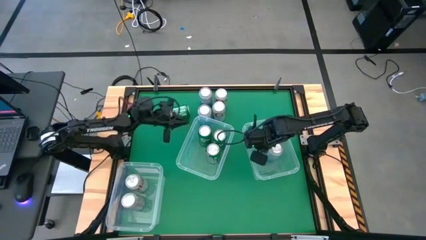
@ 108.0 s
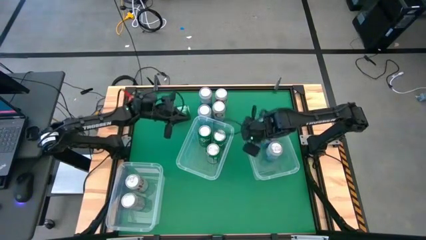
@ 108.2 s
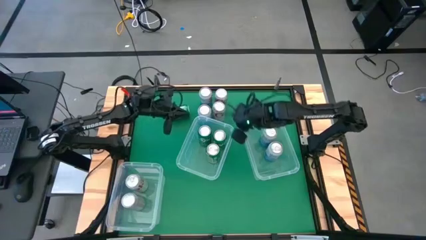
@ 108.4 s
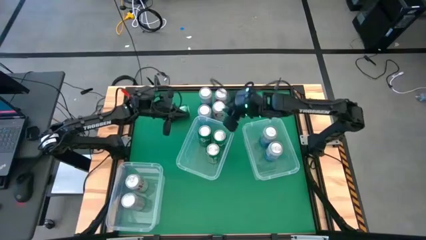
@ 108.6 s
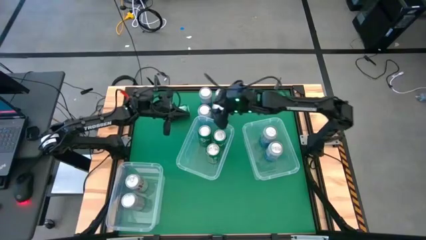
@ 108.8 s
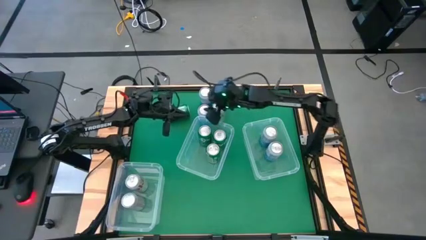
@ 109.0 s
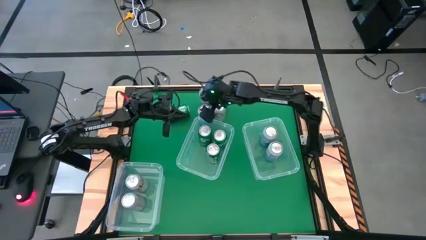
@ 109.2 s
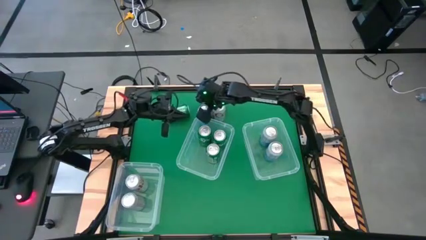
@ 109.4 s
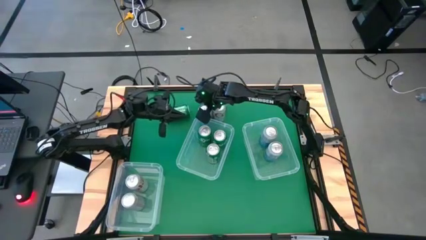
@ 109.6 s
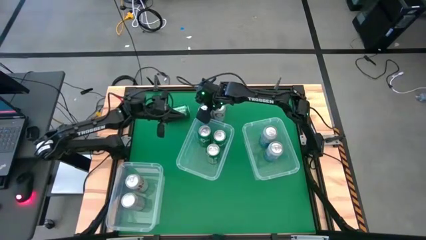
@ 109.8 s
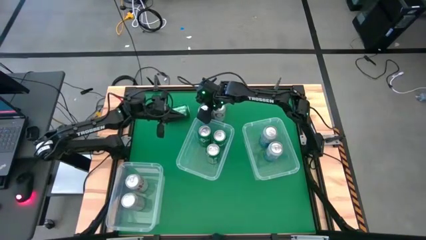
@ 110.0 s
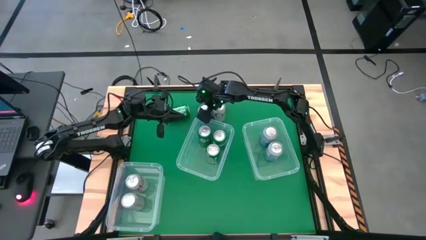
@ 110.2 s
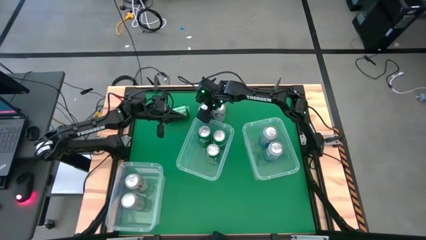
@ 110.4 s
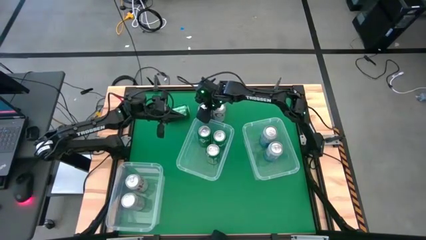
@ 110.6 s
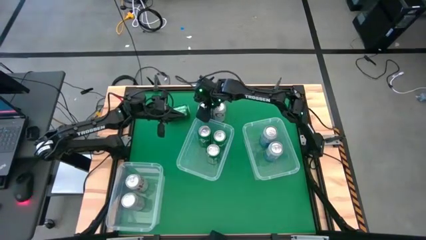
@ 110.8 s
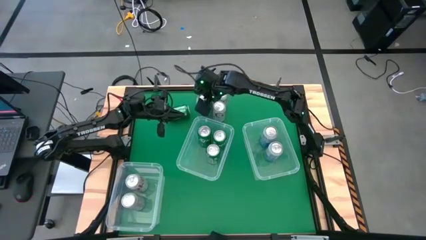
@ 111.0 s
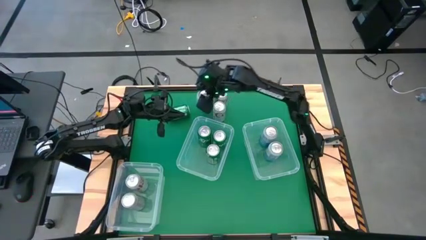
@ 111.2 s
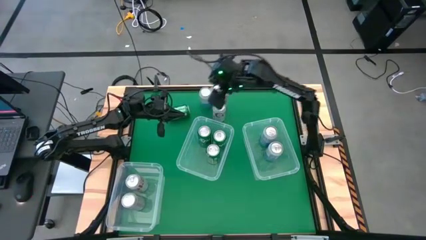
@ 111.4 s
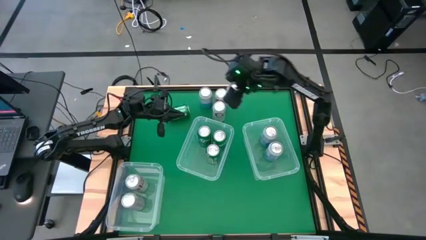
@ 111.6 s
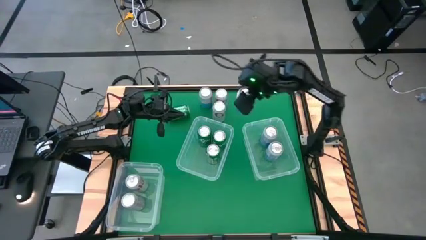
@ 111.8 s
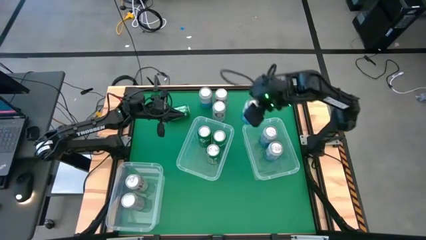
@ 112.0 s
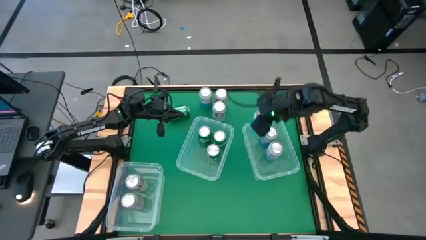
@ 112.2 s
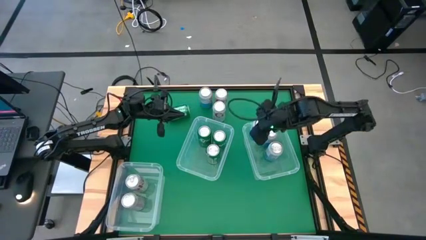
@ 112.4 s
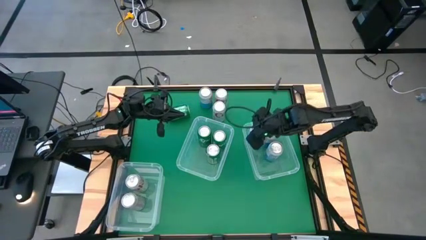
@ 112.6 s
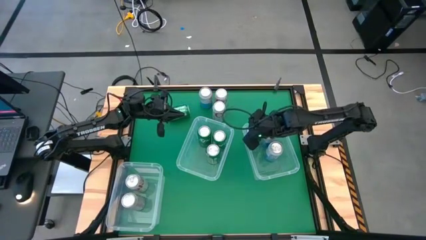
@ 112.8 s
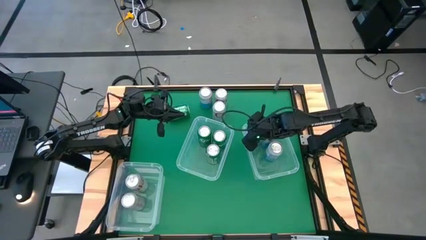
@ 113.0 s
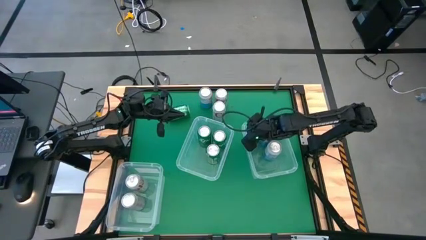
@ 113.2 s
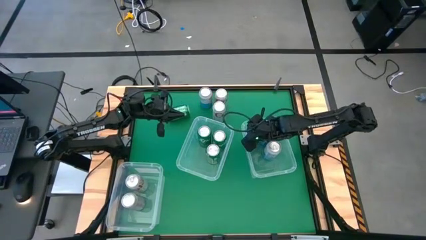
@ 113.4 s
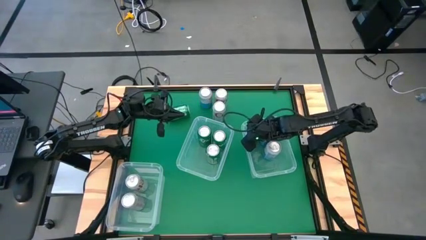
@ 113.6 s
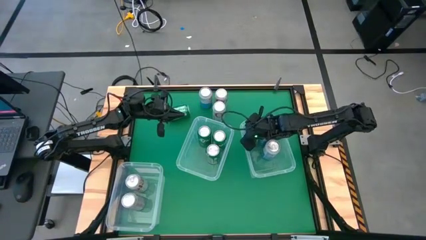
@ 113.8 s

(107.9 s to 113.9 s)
Task: Sort soda cans
Put the blue soda can into the bottom right transparent bin

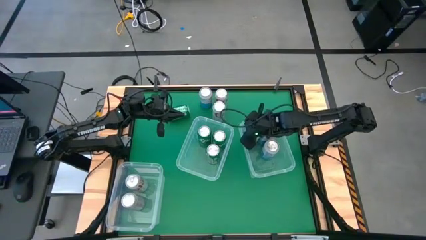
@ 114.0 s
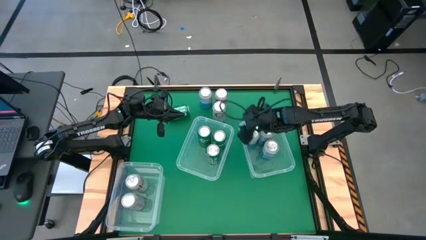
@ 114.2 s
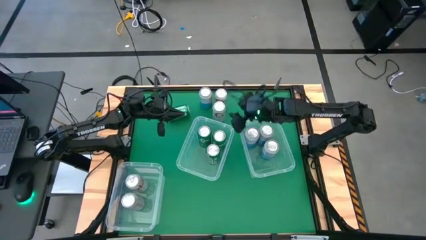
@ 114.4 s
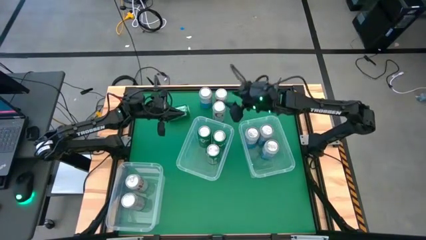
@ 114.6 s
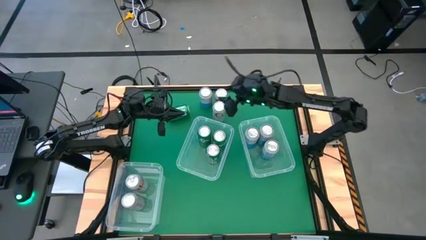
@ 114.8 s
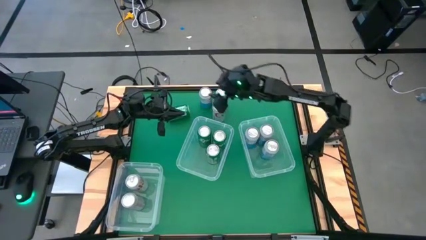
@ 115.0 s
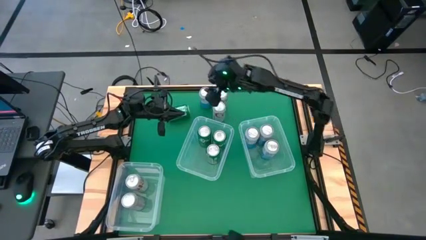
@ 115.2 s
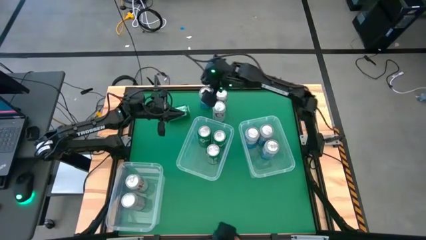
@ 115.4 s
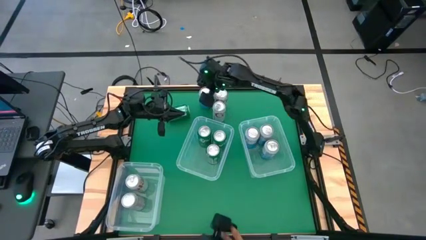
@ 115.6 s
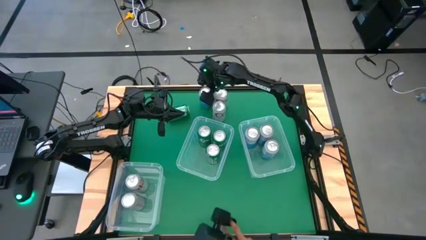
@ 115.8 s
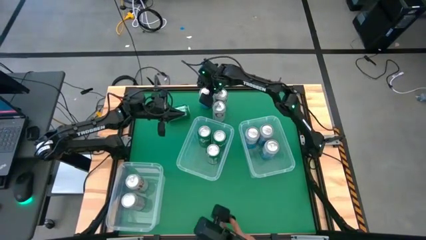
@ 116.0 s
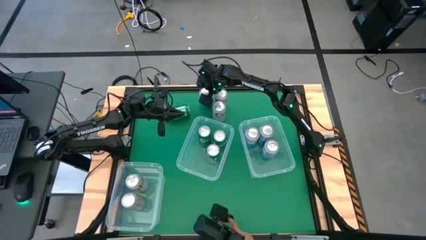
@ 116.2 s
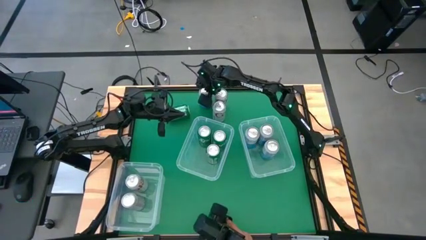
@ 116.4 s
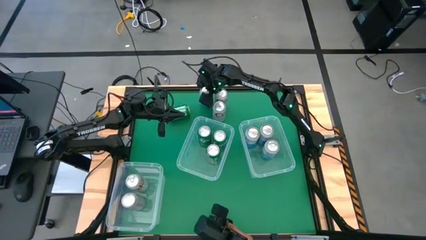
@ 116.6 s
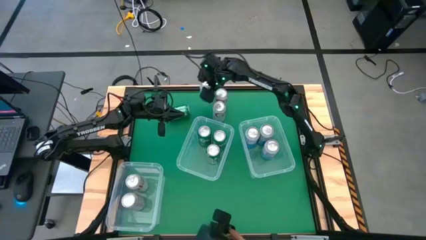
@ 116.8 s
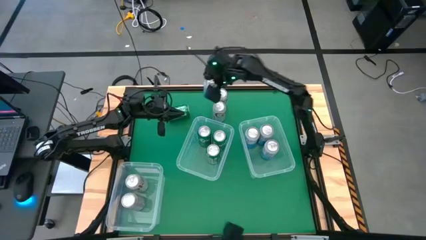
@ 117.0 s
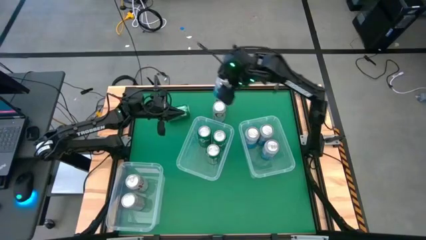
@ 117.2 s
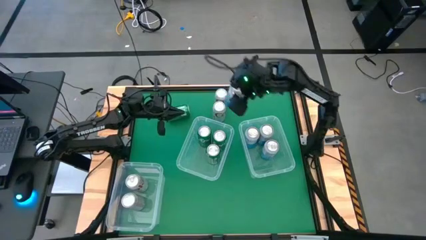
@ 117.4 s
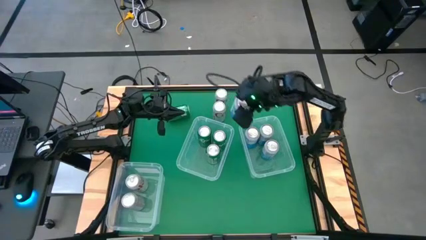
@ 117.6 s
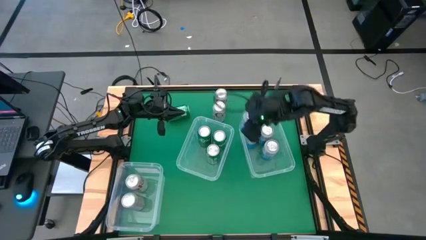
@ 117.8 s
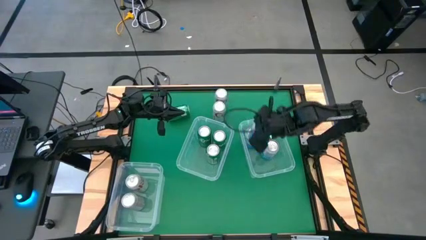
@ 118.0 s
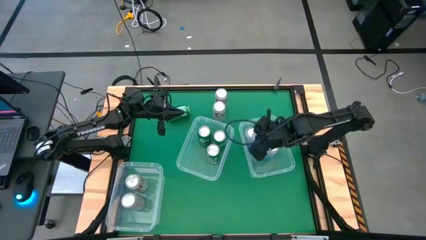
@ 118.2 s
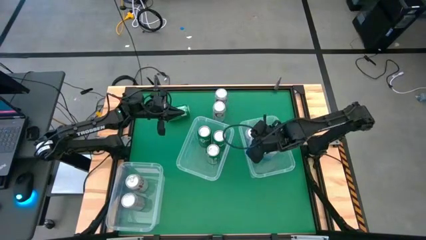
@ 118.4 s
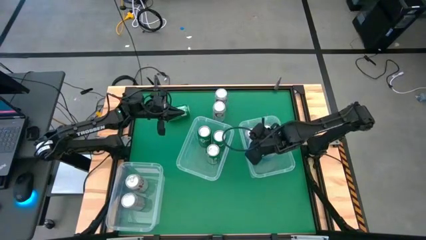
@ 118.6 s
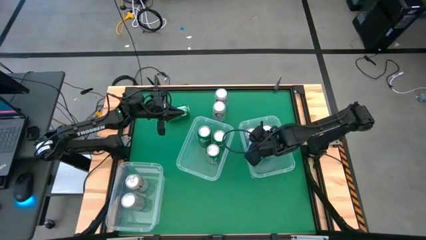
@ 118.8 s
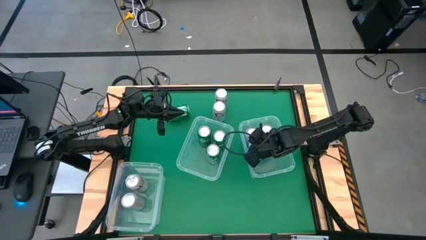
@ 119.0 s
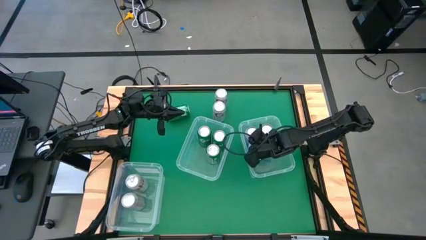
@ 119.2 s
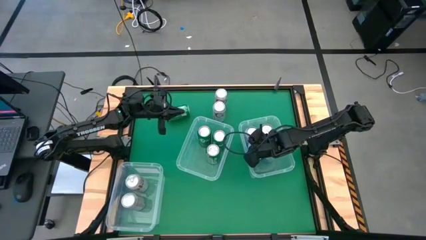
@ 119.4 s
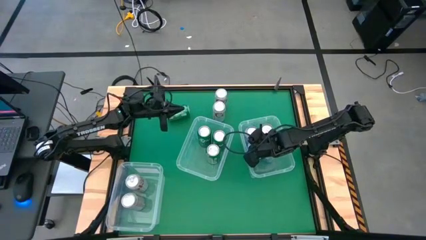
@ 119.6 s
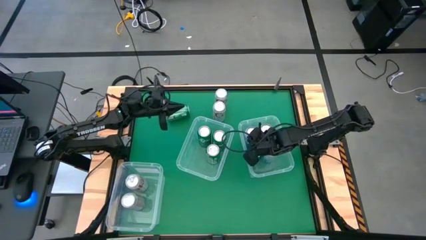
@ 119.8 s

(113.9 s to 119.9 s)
Put the blue soda can into the bottom right transparent bin

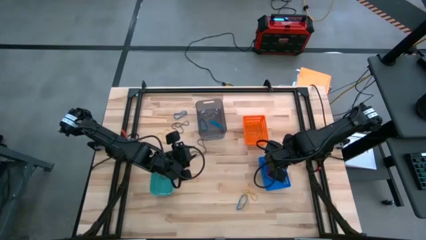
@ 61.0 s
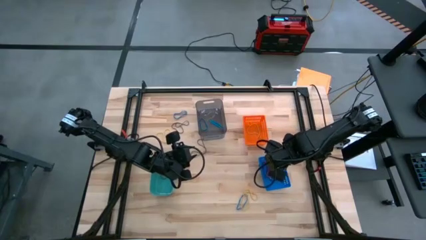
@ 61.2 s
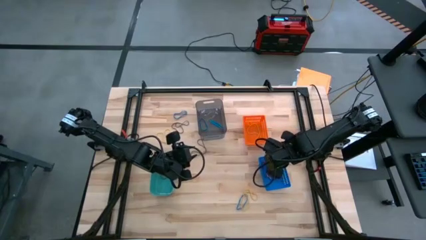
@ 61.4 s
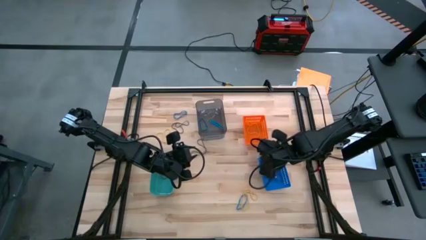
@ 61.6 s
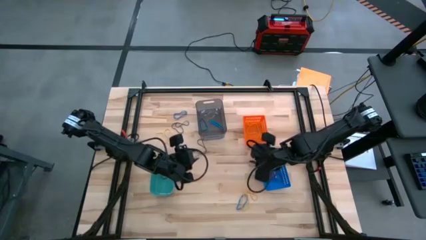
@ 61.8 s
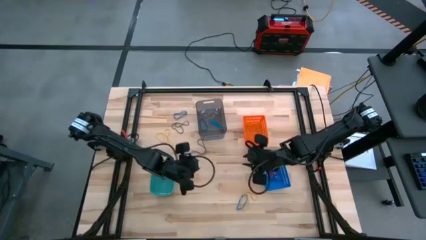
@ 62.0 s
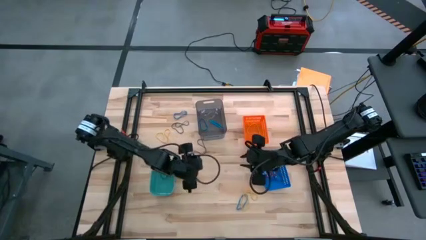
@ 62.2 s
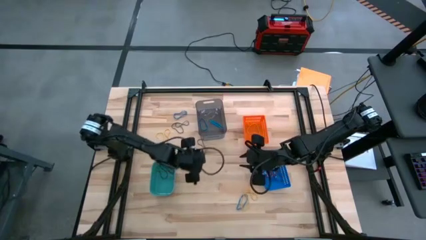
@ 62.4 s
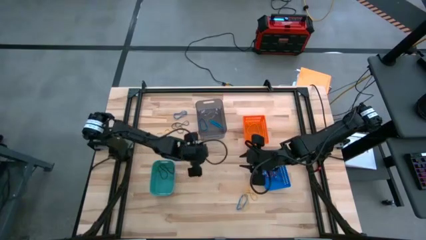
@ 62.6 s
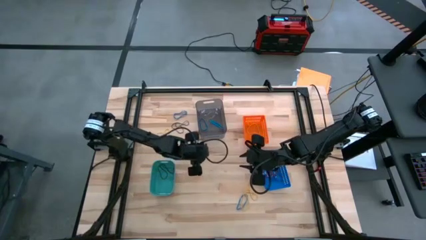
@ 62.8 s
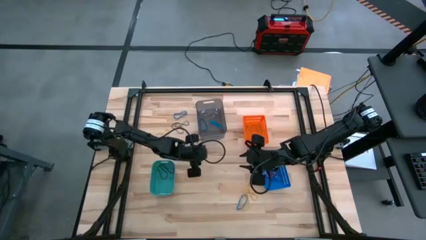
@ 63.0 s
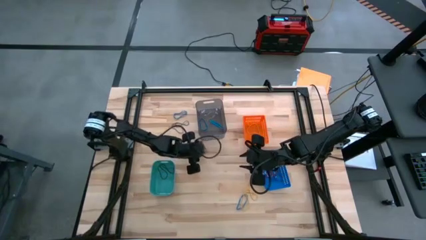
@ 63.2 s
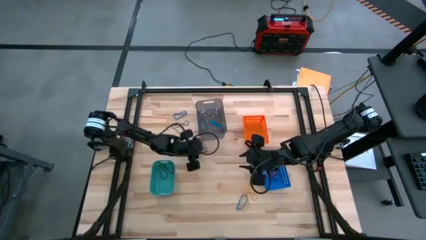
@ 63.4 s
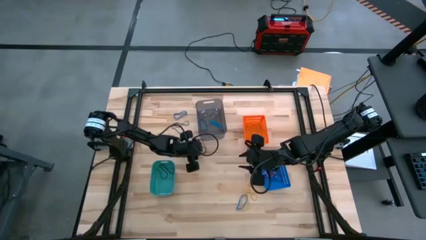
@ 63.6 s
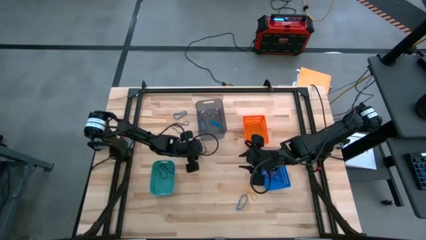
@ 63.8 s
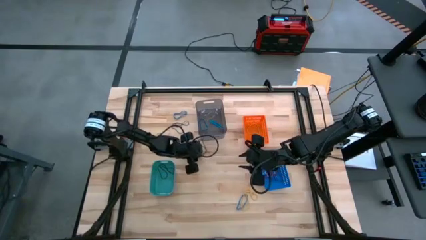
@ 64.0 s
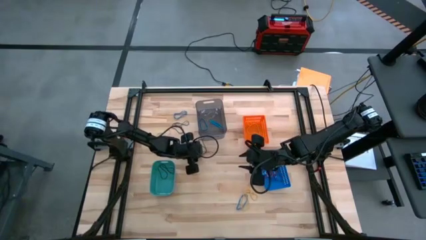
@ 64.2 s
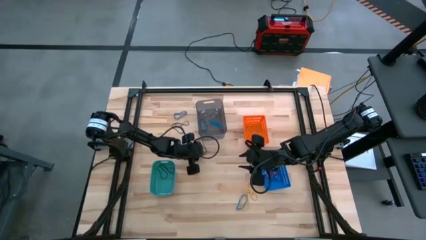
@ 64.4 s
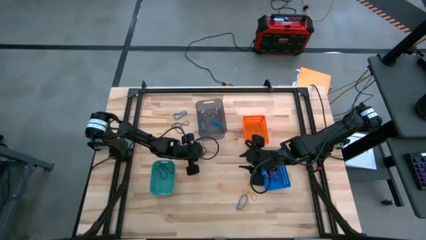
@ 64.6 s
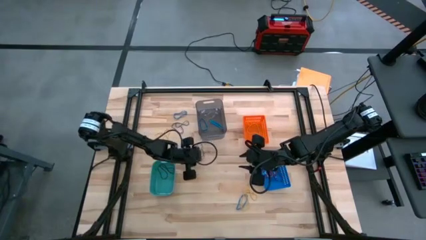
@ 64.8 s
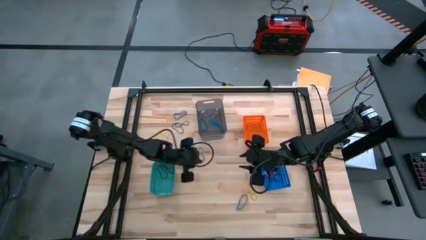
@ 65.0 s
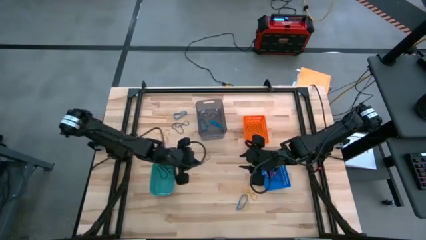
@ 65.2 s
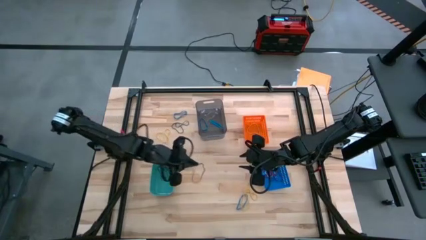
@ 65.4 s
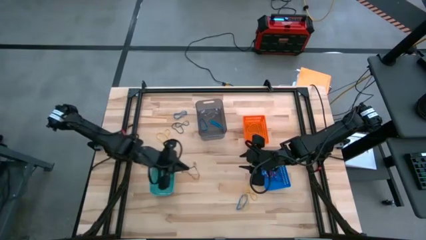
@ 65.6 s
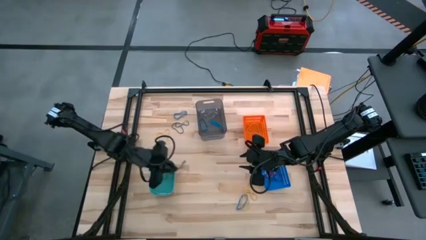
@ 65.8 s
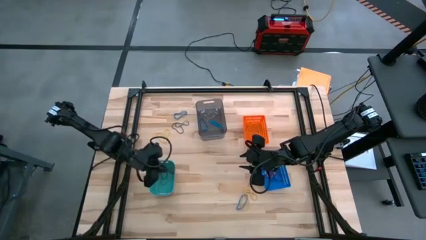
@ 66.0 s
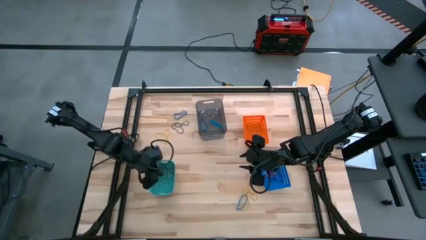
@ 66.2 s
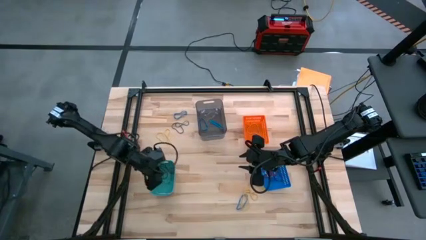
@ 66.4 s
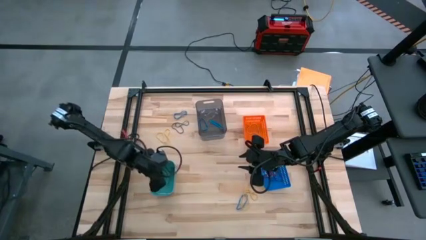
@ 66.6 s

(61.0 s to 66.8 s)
Task: Sort rubber bands into baskets
Put the black rubber band into the green bin
